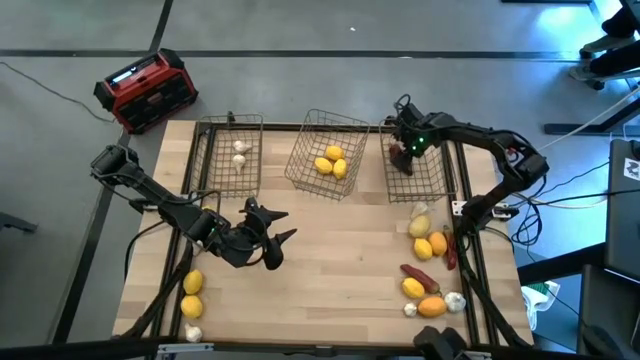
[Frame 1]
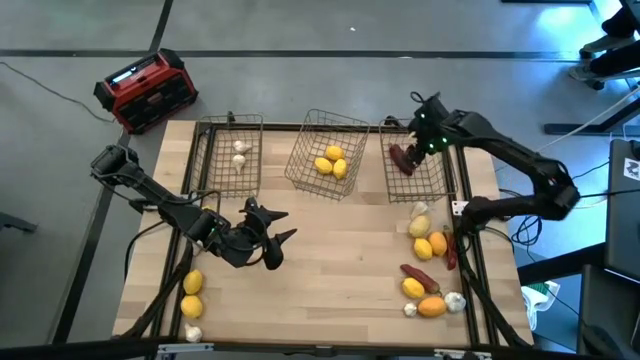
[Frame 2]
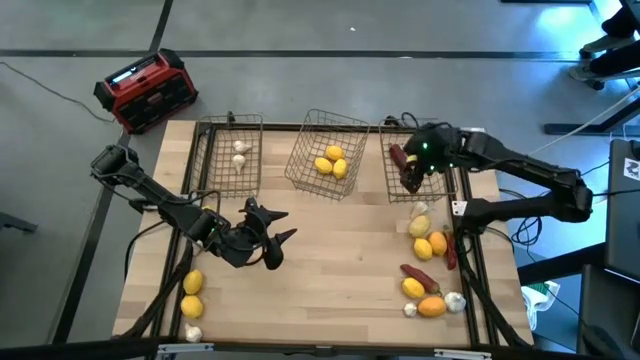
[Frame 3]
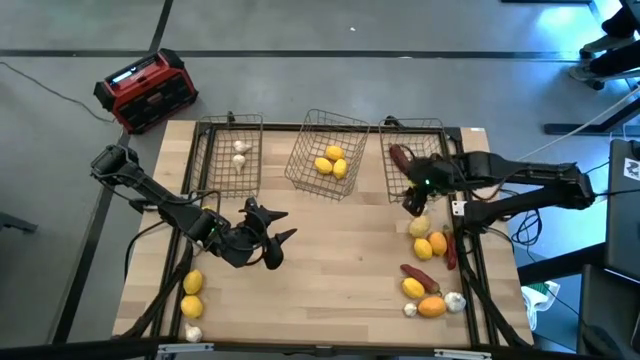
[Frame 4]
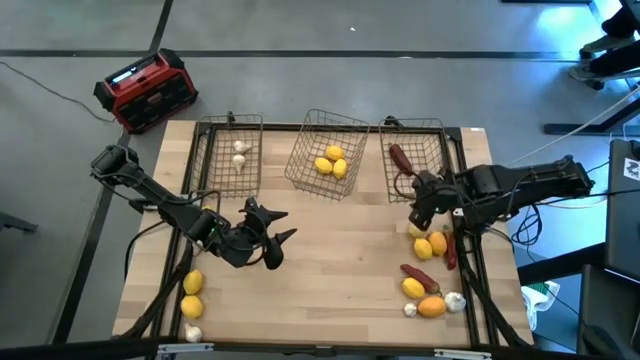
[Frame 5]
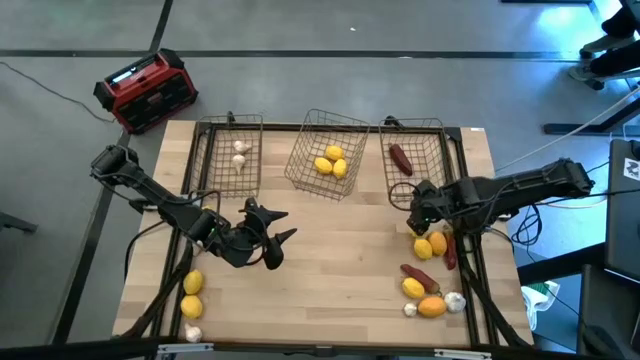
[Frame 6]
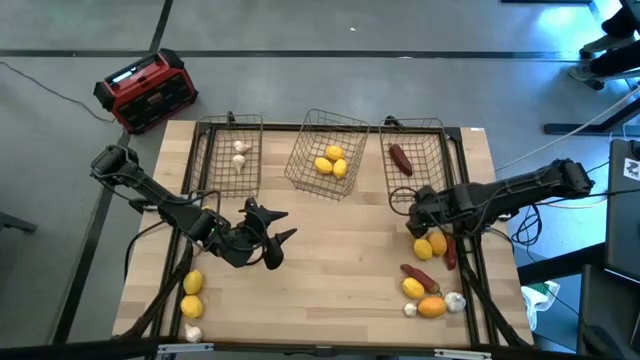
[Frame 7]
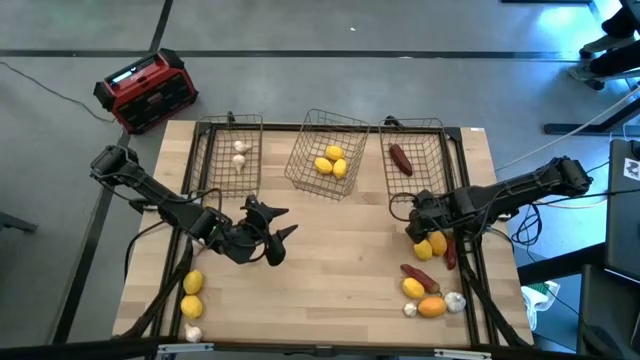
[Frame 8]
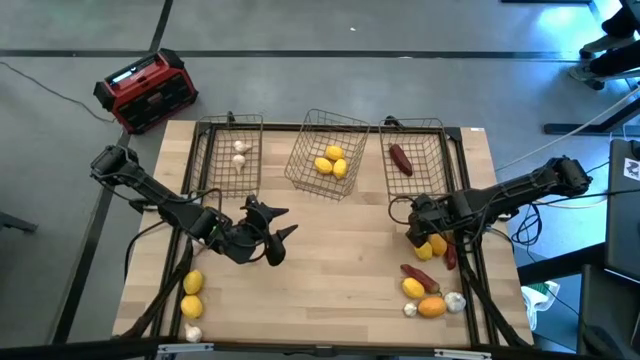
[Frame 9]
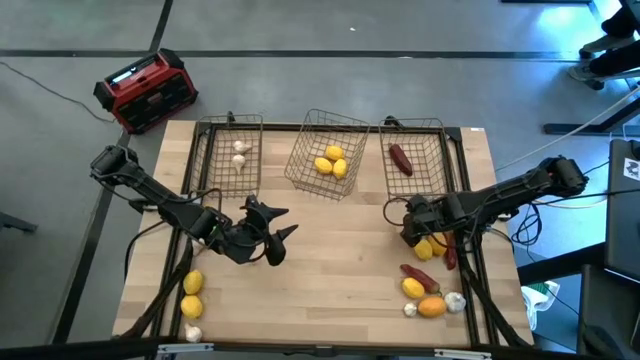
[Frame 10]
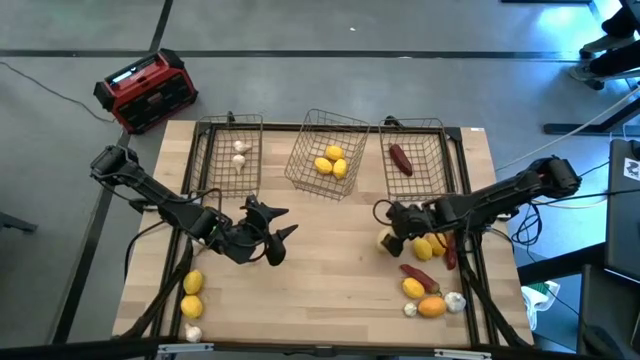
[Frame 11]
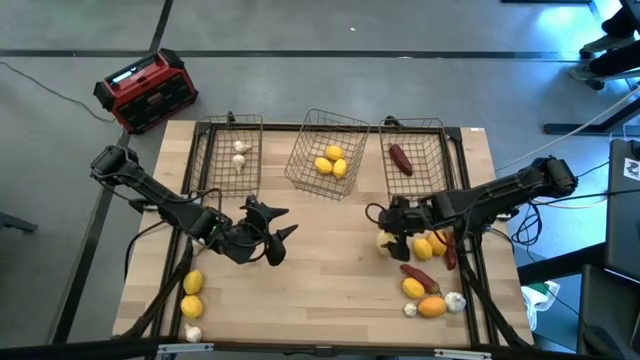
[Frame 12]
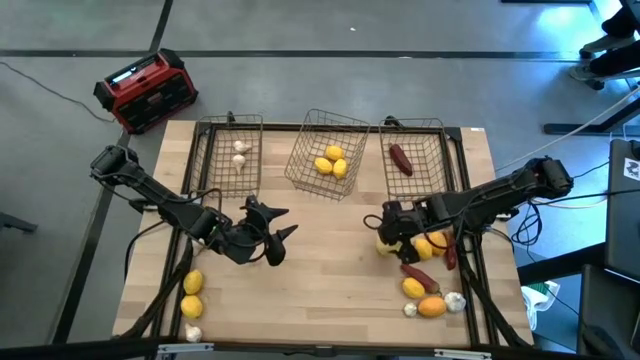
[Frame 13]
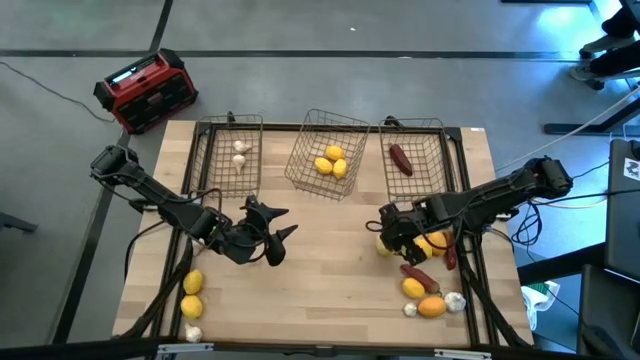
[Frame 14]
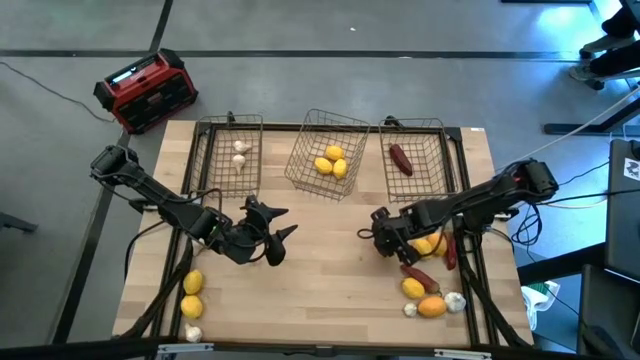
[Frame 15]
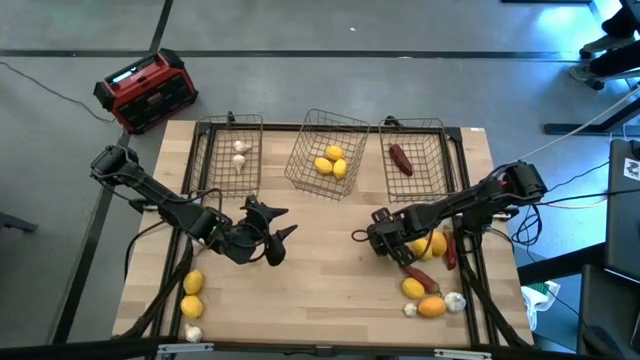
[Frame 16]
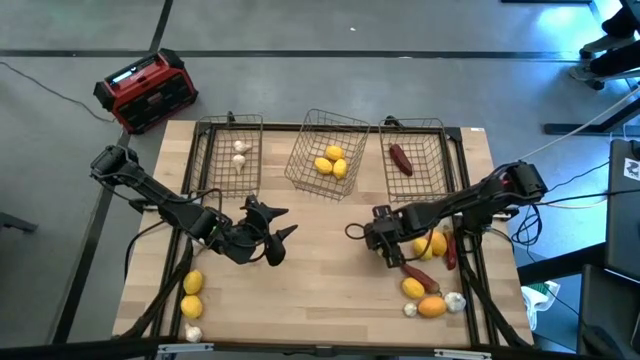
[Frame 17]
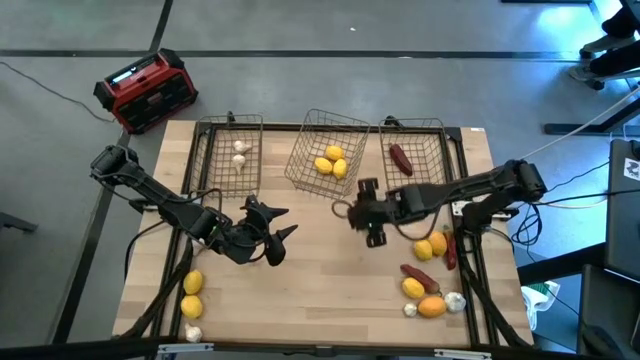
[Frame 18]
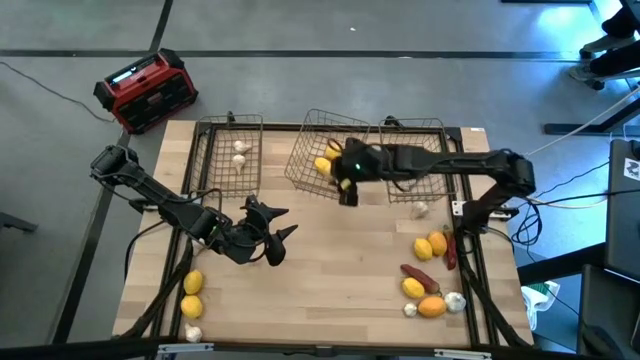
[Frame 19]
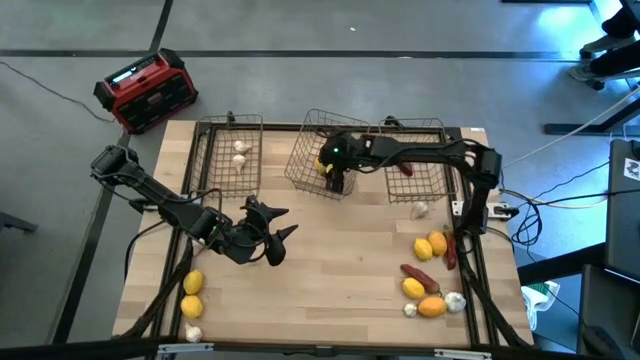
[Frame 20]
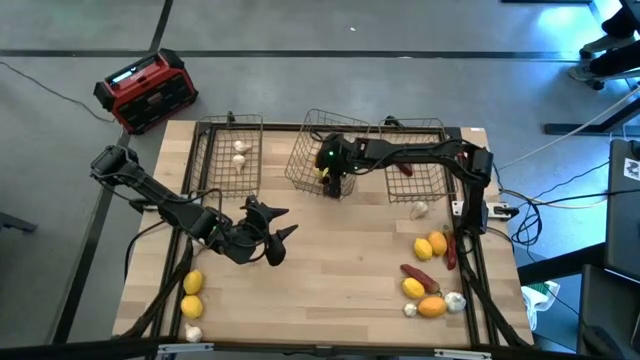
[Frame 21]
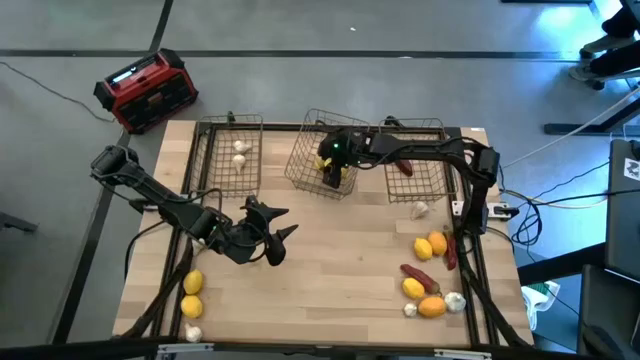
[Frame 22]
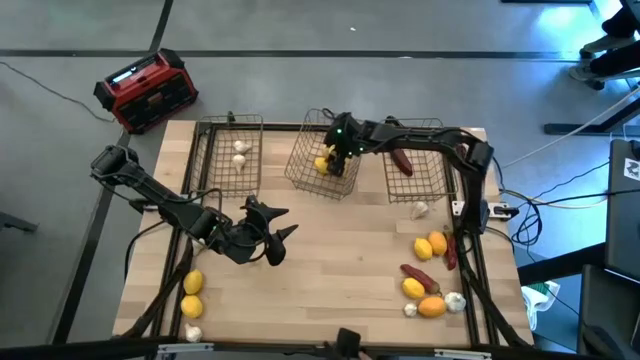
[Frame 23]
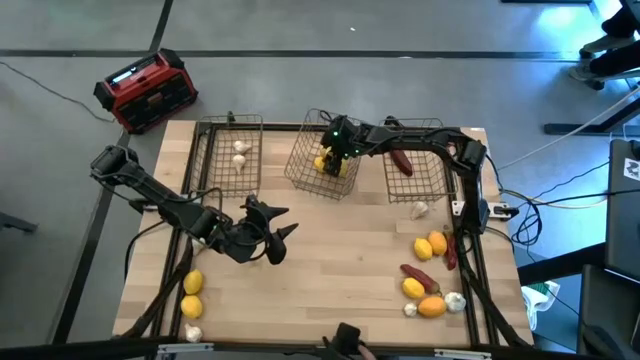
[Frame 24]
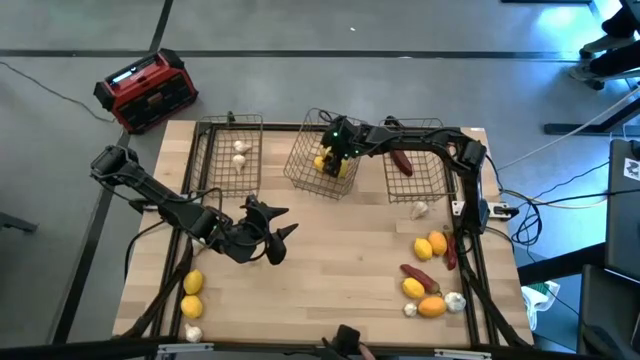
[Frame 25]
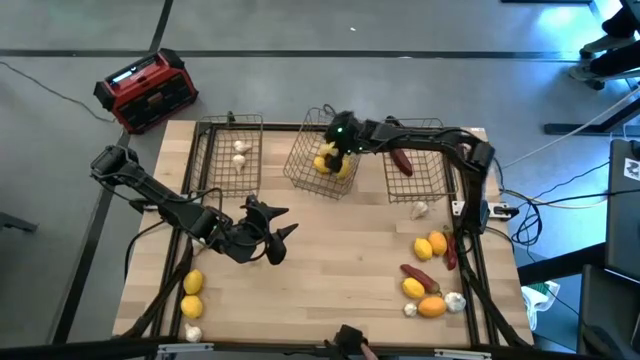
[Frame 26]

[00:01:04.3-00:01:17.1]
Task: Sort produce into baskets
Put the lemon into the middle wire basket

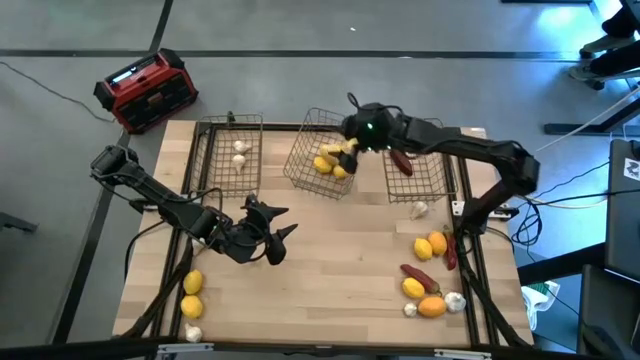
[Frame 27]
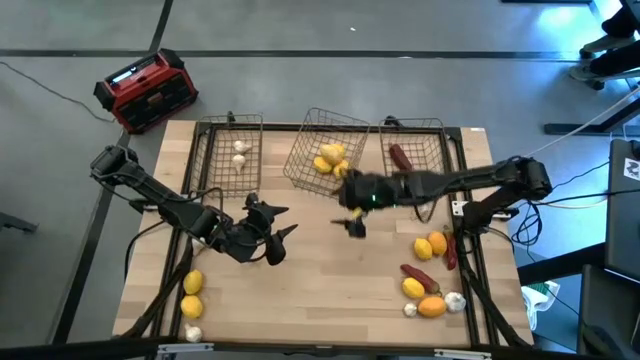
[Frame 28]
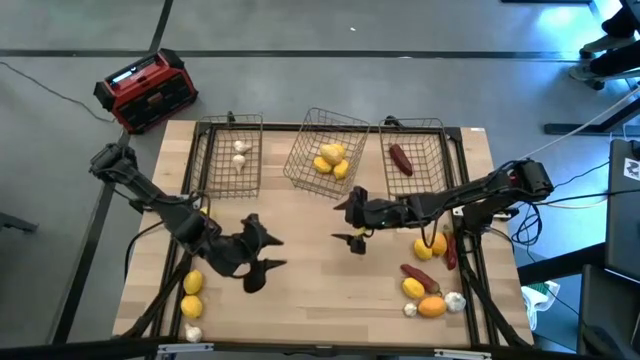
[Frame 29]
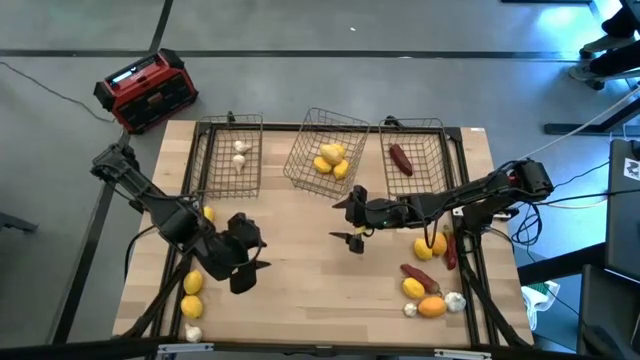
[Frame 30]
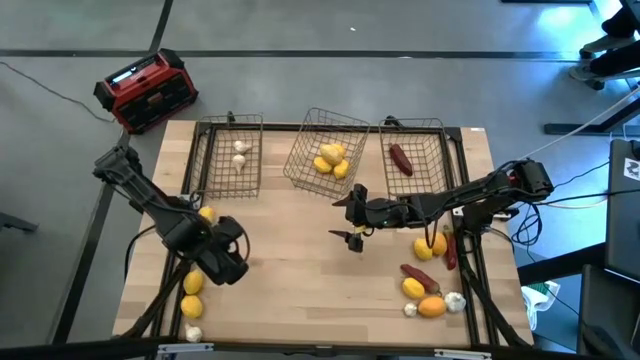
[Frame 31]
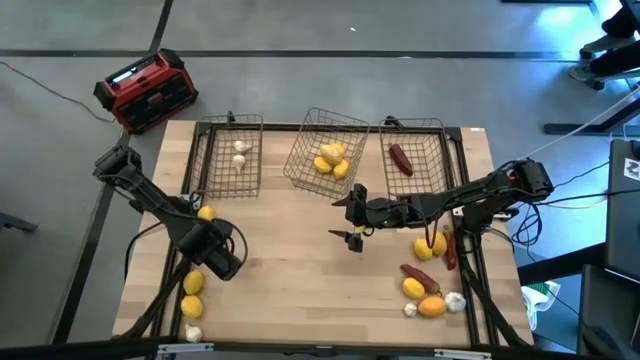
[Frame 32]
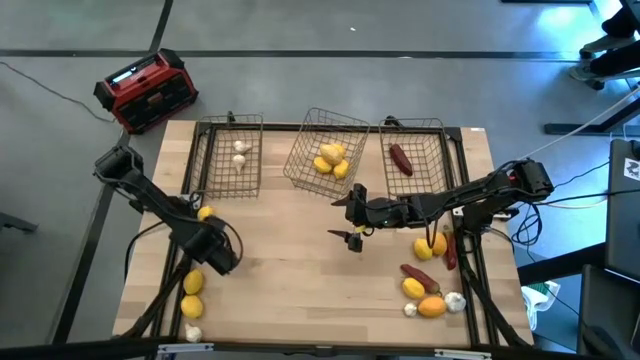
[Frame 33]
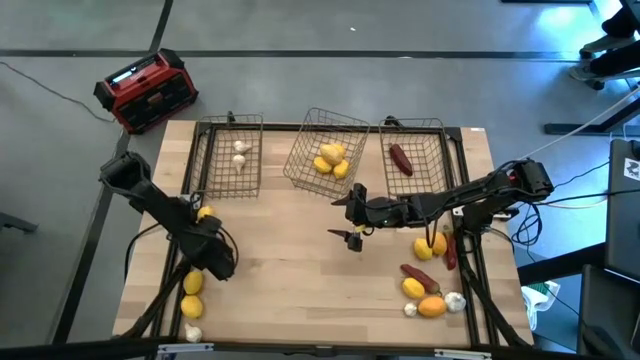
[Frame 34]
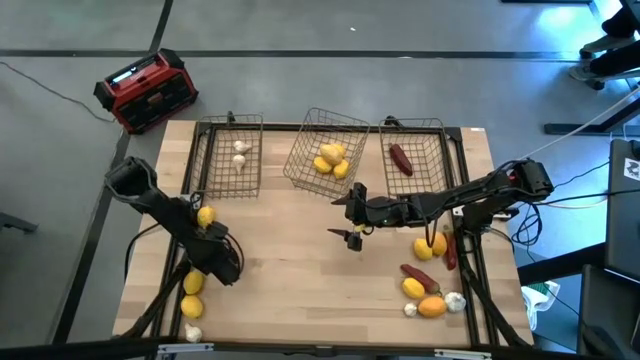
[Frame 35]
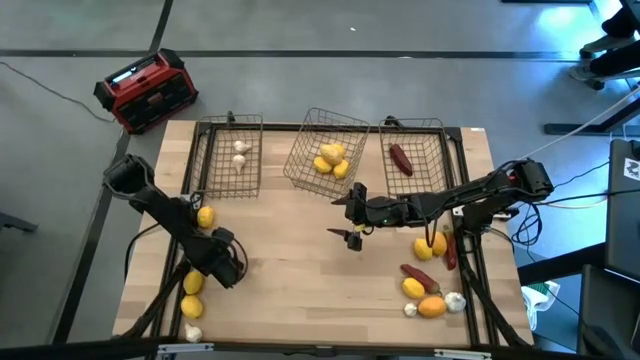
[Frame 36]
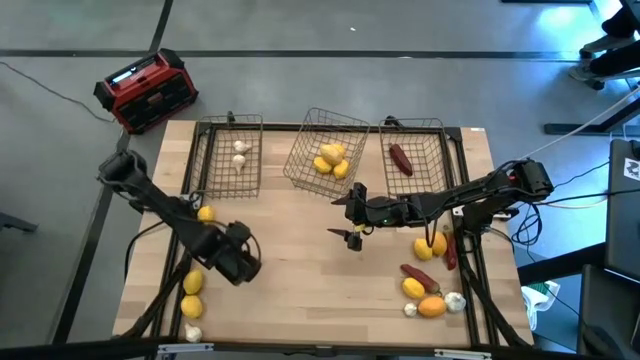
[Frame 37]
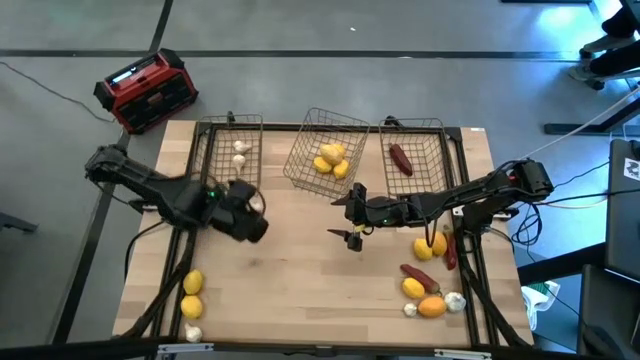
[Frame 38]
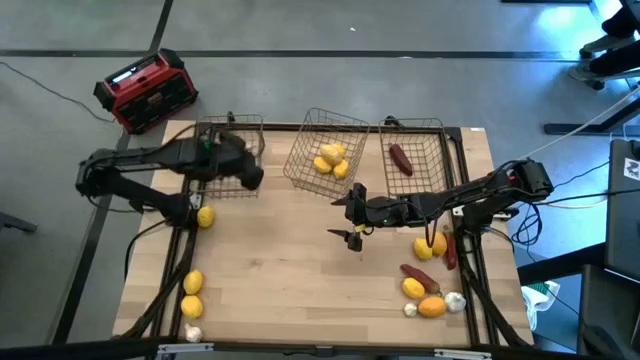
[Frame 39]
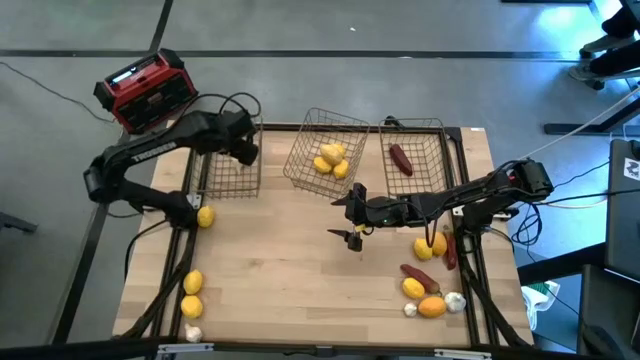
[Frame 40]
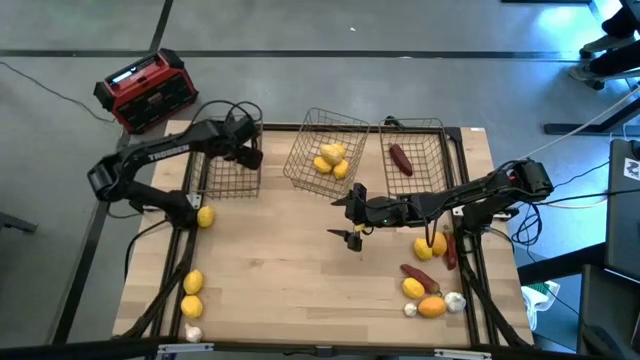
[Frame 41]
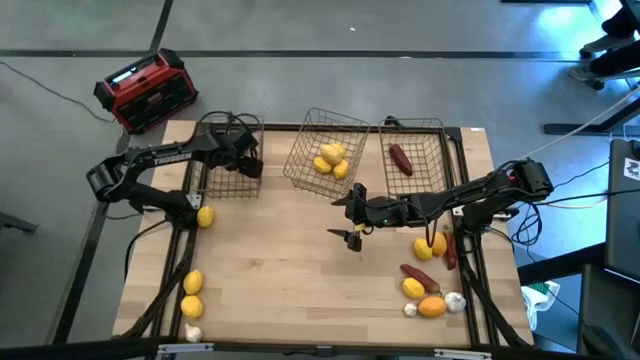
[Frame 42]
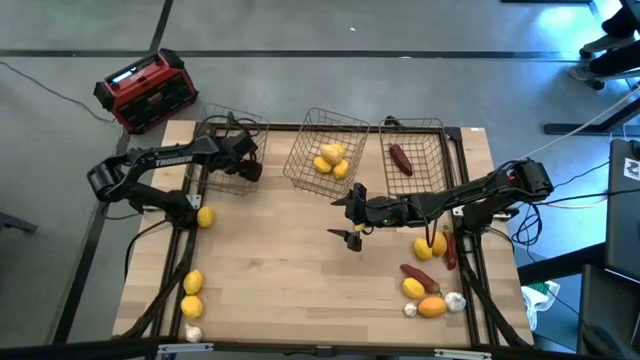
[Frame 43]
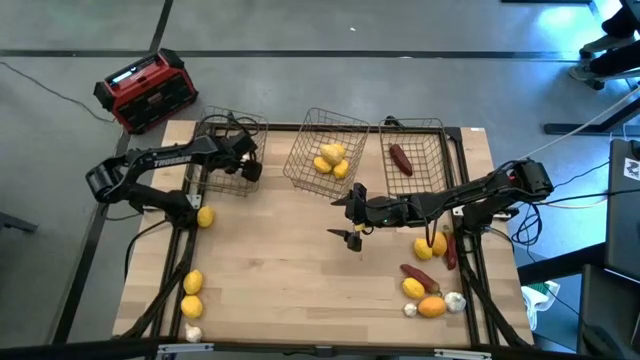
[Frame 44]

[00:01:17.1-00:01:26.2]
Put the garlic into the left wire basket
